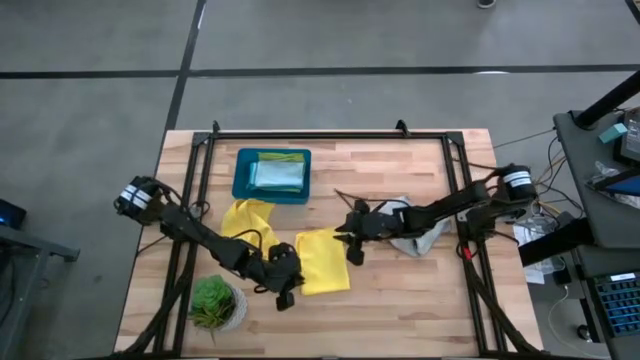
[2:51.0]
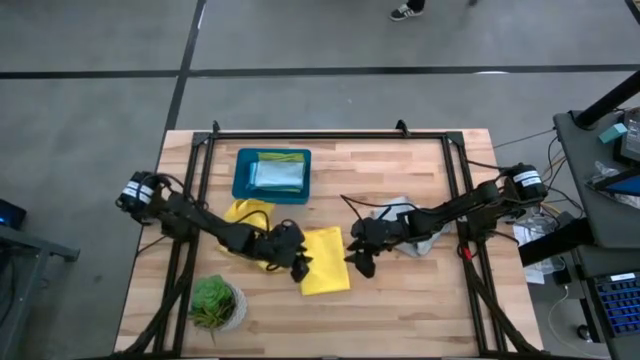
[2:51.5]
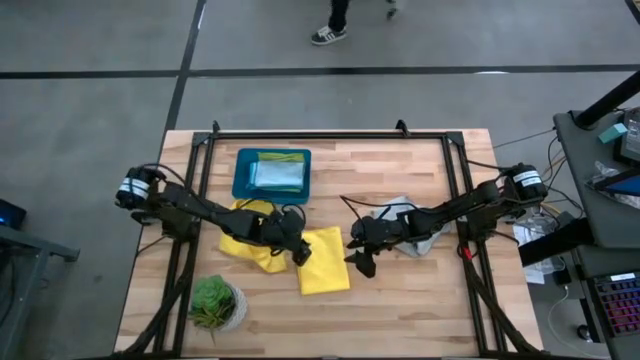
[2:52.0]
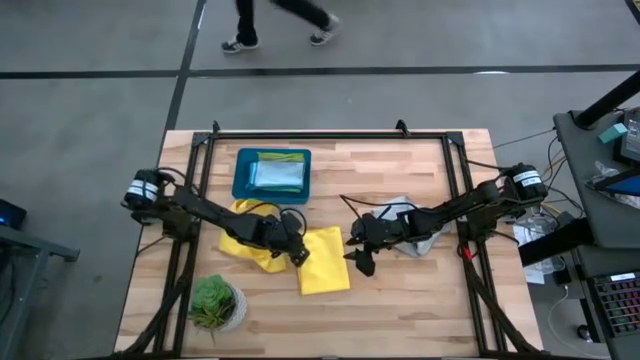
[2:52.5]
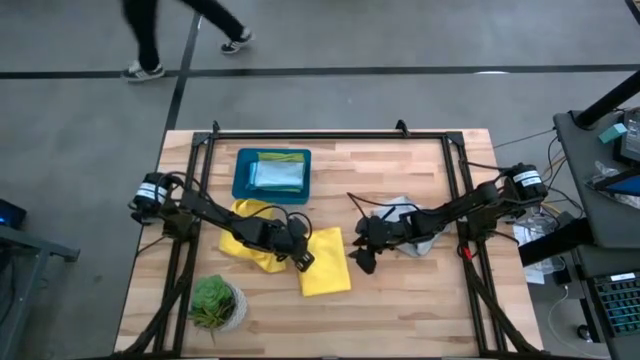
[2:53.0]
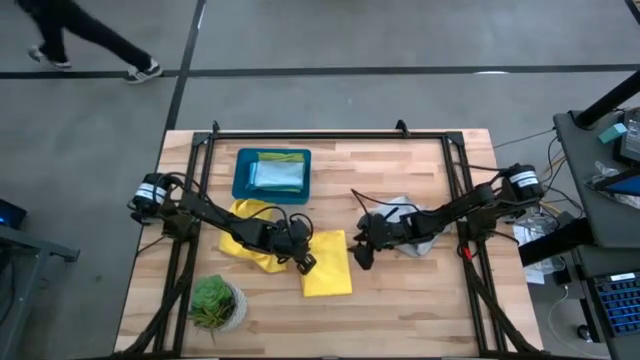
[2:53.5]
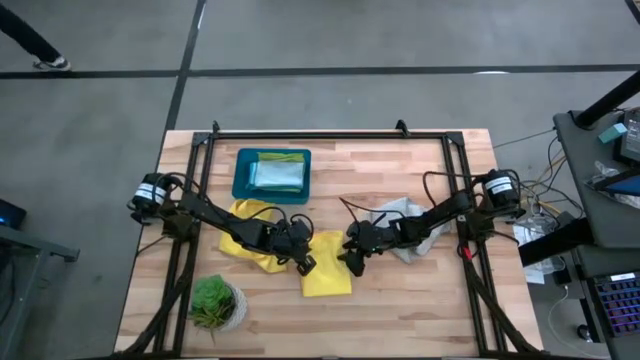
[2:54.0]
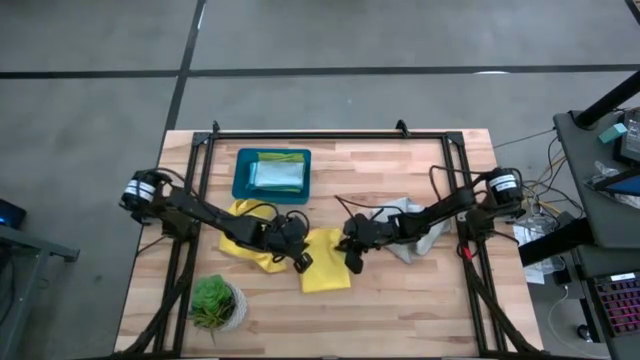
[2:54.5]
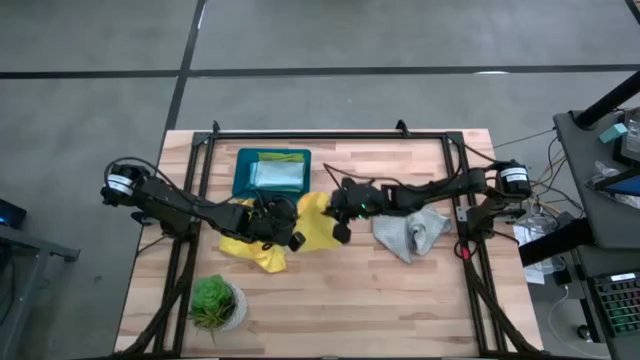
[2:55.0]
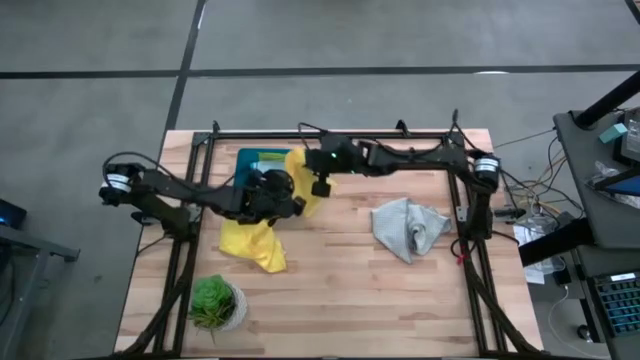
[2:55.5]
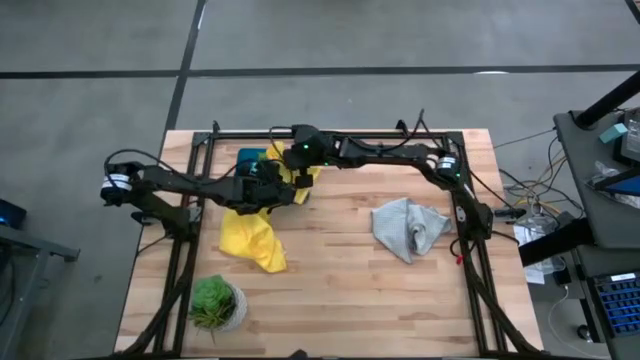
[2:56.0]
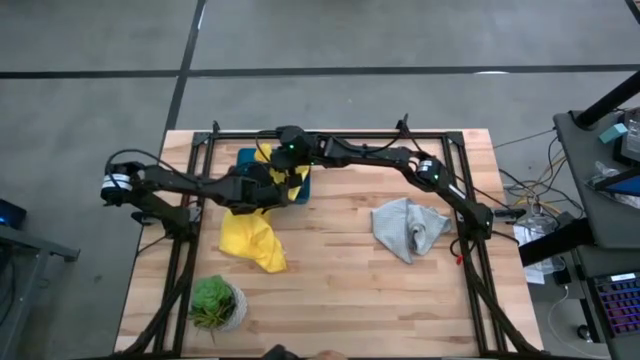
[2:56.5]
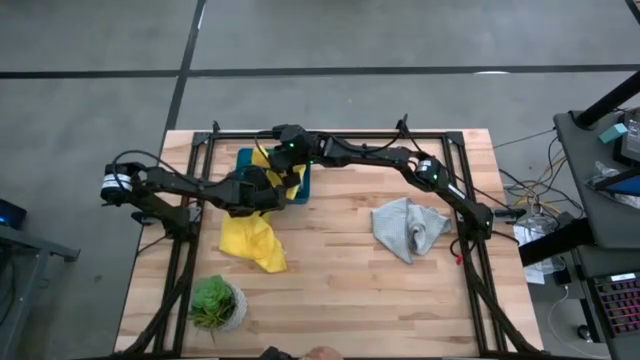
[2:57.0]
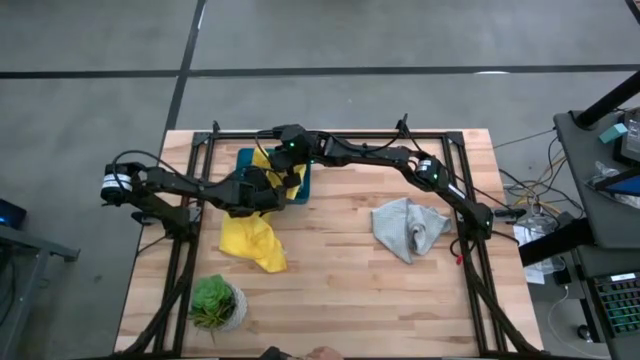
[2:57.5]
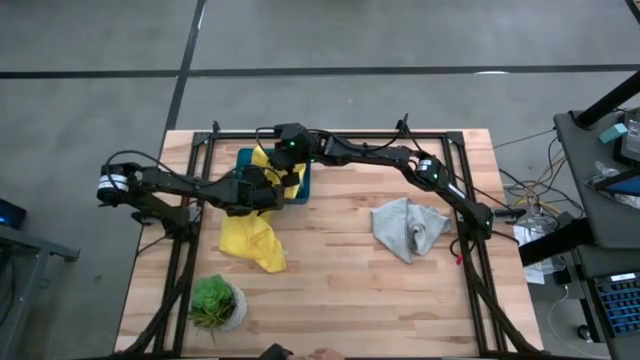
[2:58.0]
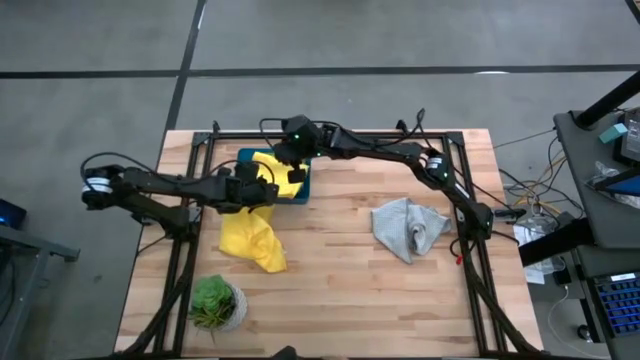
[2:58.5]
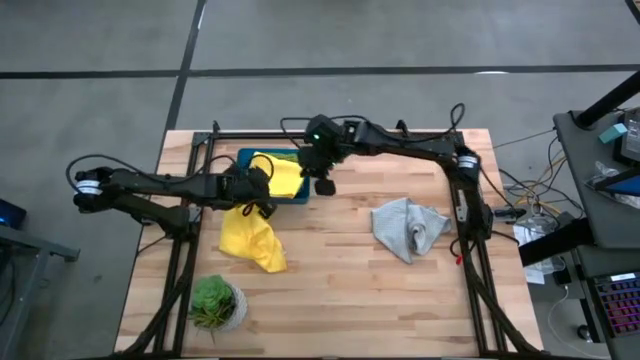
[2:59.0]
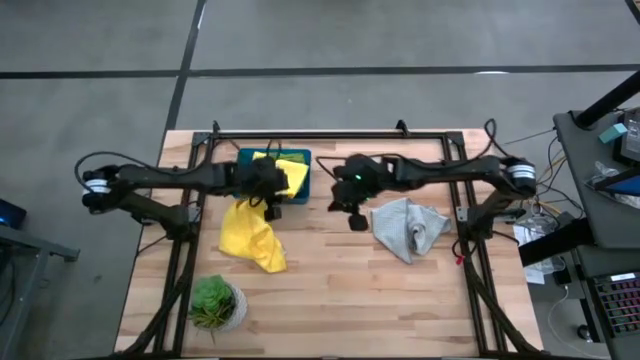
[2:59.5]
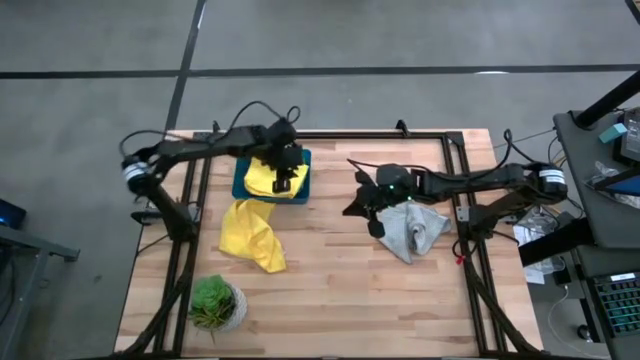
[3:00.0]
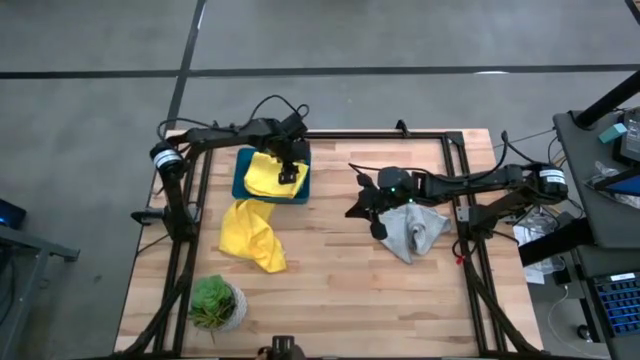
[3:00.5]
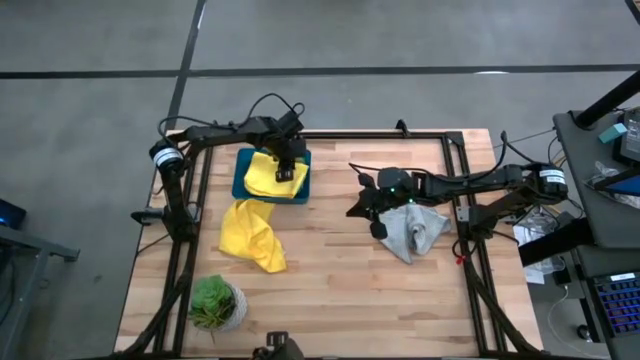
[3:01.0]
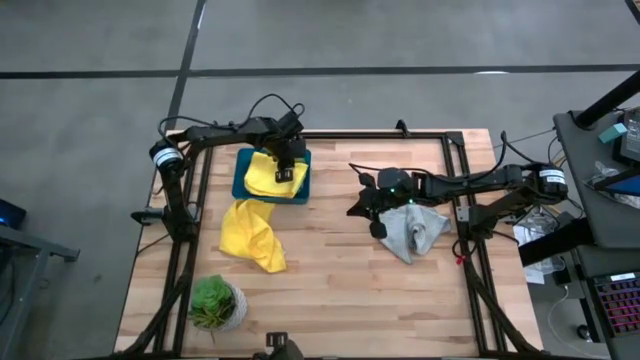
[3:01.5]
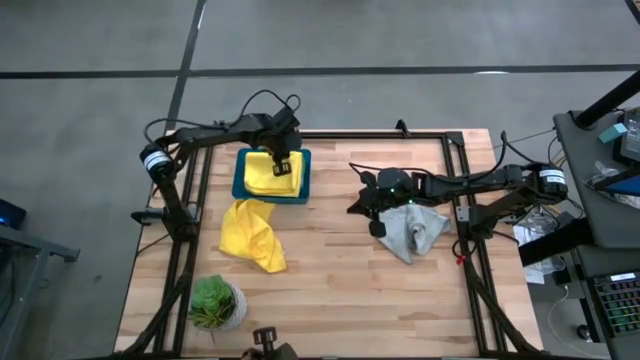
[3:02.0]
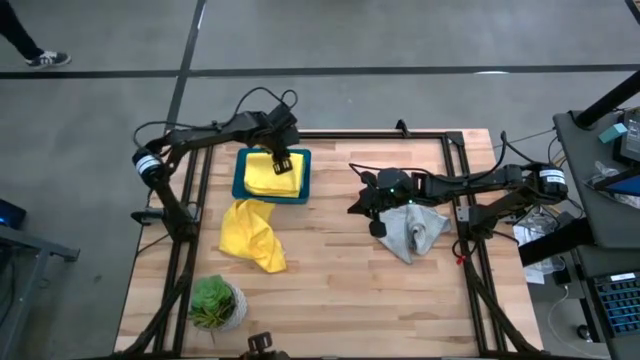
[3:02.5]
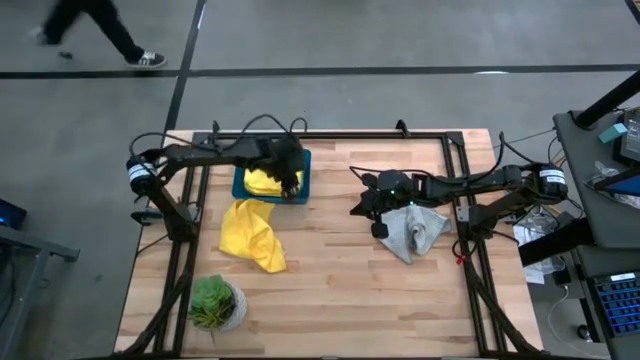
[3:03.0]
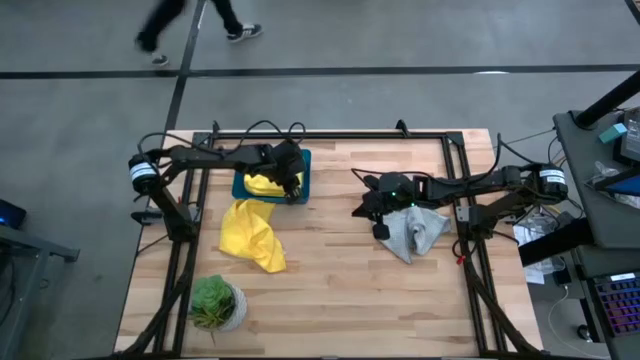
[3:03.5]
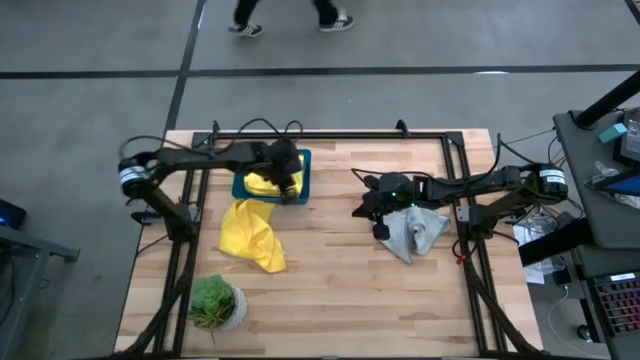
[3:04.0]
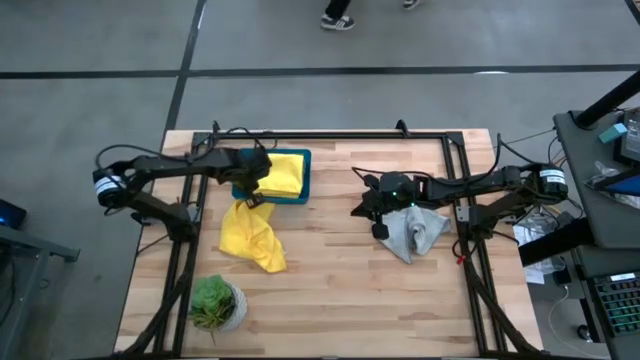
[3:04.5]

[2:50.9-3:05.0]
Task: Fold microfiber towels
Put the right yellow microfiber towel into the blue bin

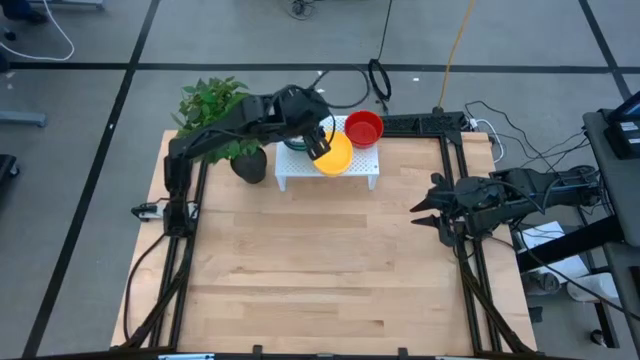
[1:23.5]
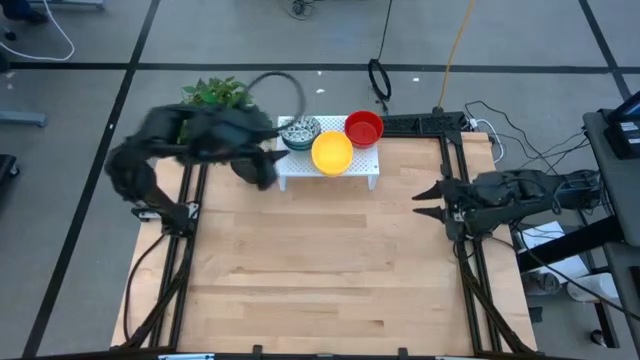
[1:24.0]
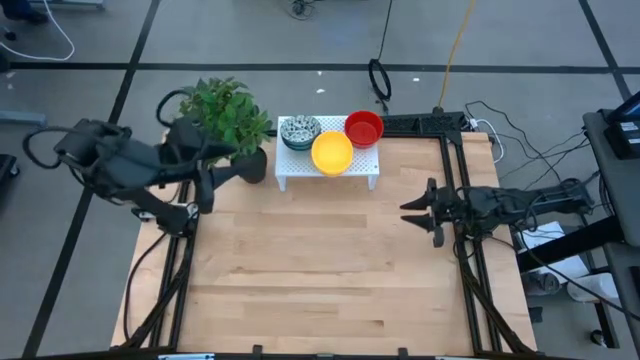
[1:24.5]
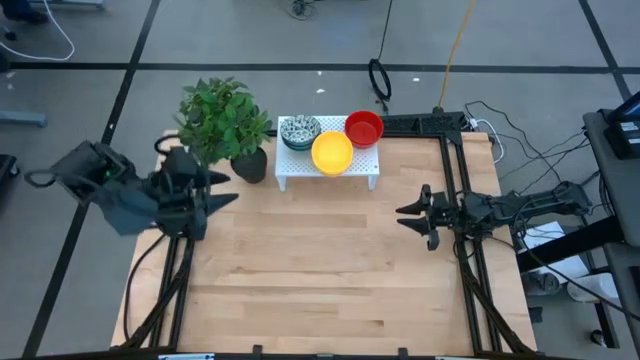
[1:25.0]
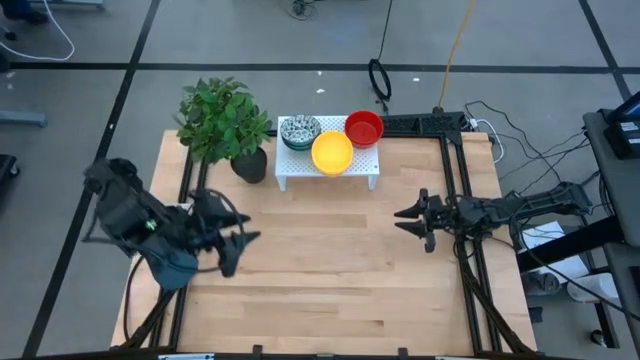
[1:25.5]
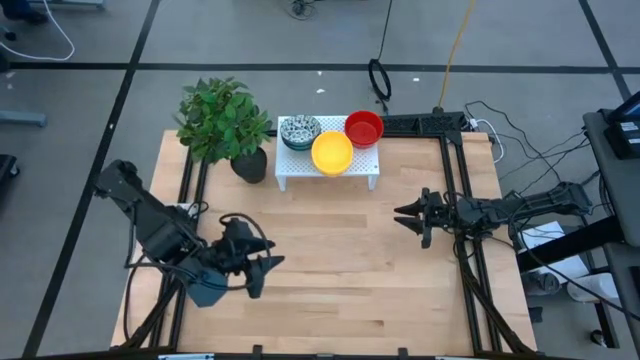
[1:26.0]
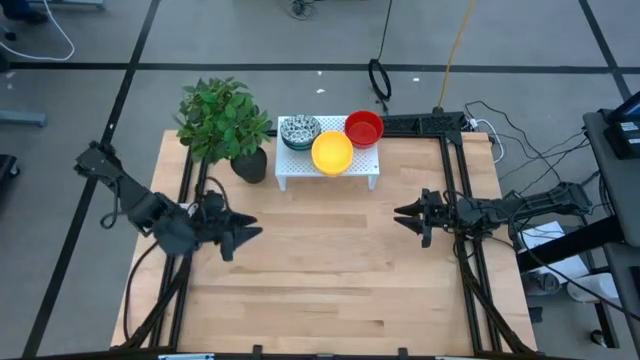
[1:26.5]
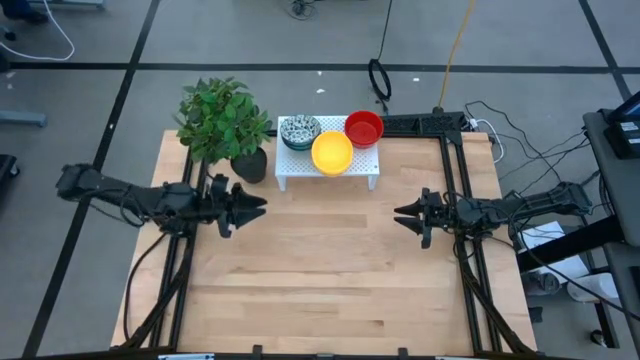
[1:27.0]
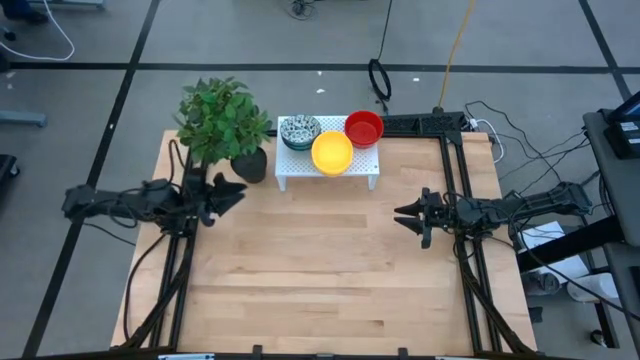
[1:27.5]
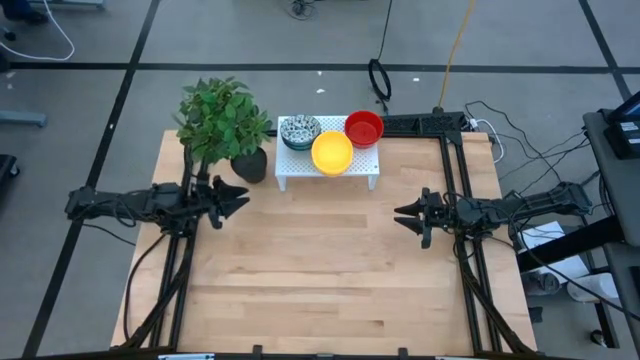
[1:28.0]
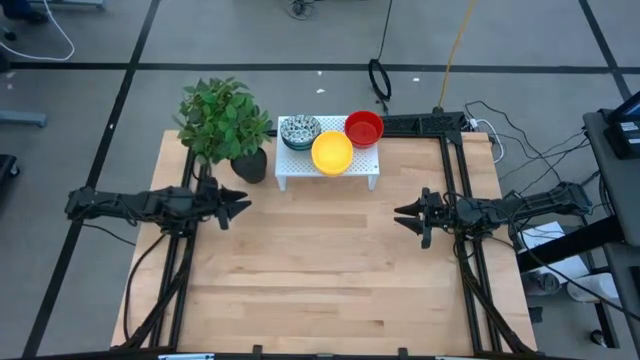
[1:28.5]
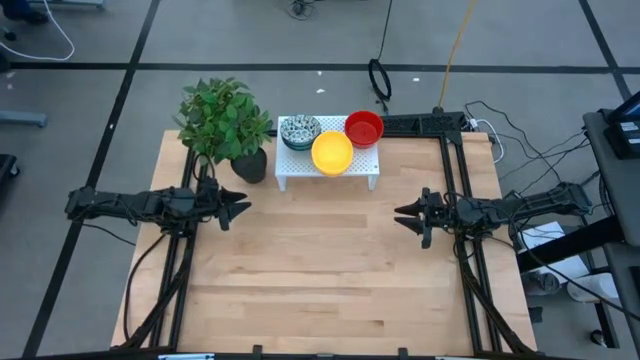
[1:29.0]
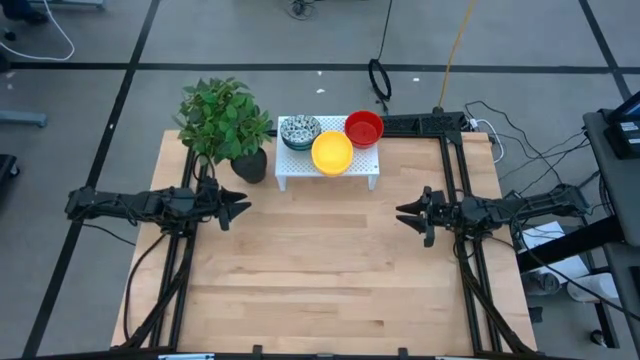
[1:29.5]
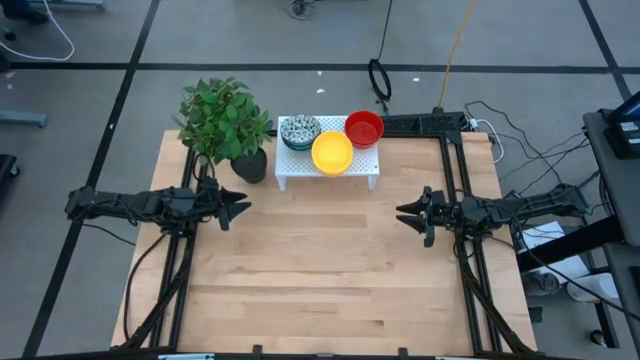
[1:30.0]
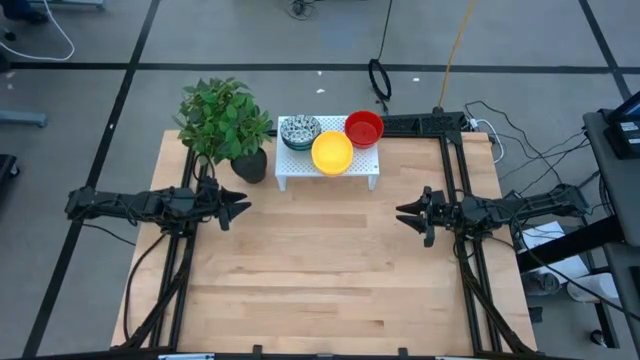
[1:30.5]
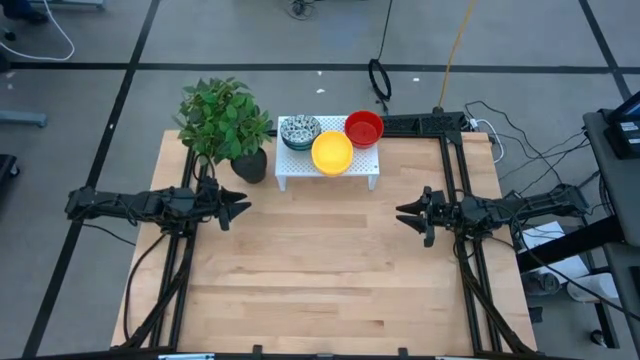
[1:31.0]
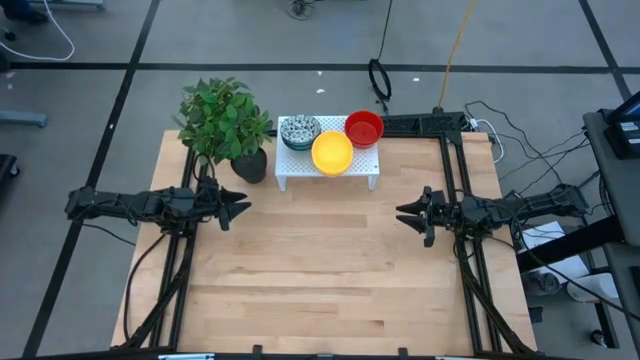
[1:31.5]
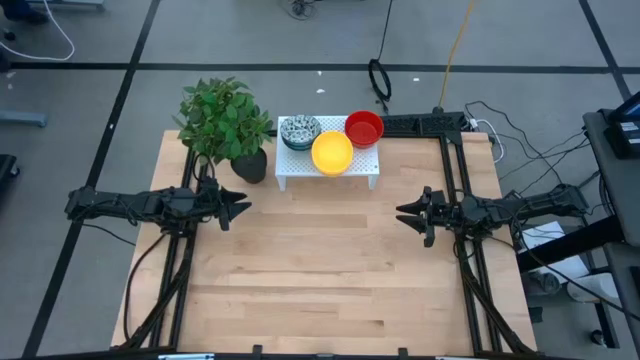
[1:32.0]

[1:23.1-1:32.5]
Task: Pick & Place Mini bowls
Return to Home Position
